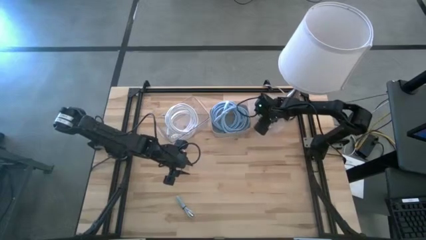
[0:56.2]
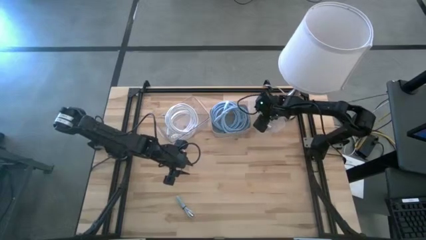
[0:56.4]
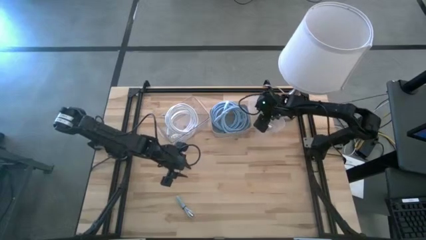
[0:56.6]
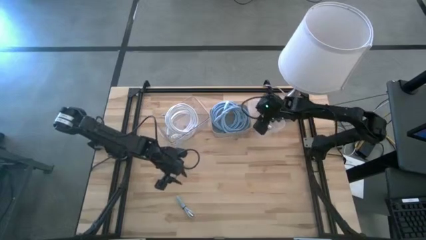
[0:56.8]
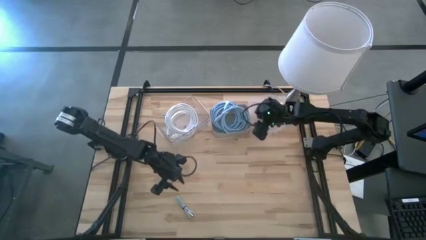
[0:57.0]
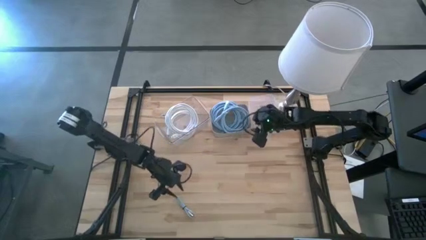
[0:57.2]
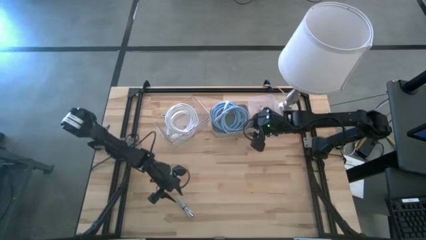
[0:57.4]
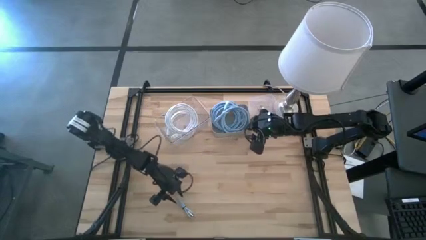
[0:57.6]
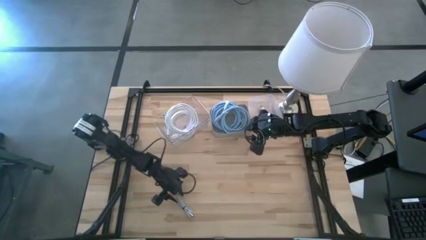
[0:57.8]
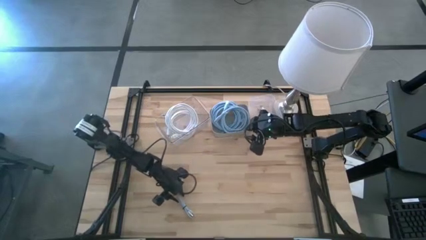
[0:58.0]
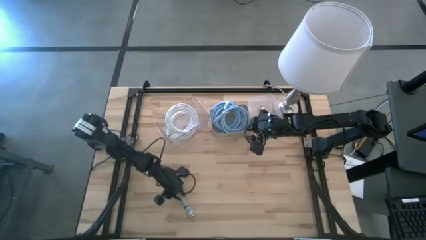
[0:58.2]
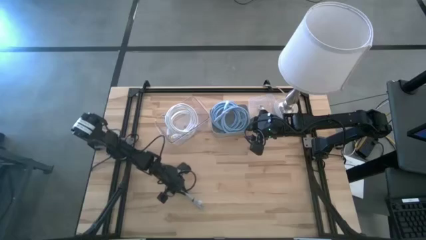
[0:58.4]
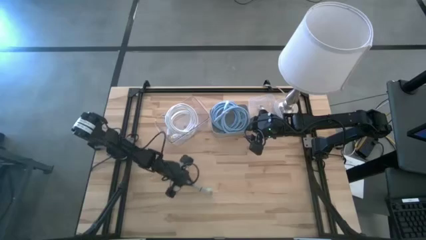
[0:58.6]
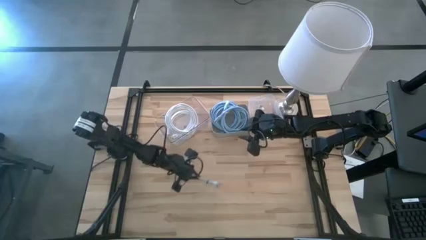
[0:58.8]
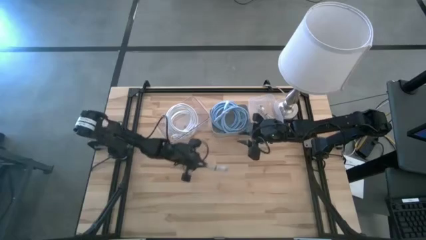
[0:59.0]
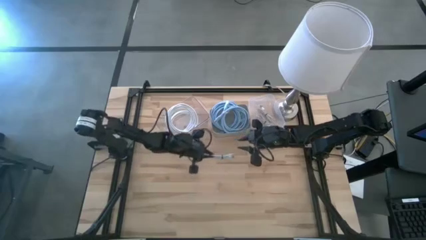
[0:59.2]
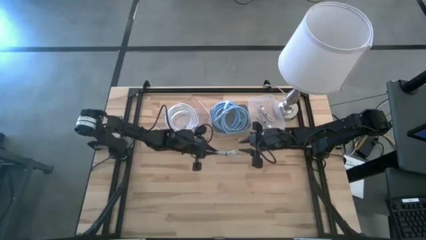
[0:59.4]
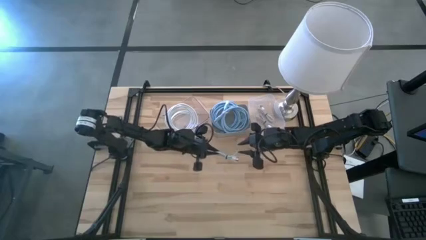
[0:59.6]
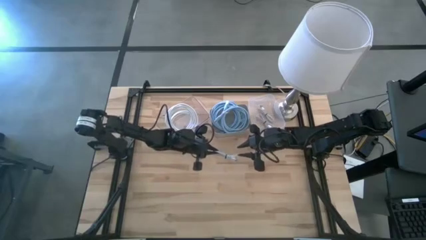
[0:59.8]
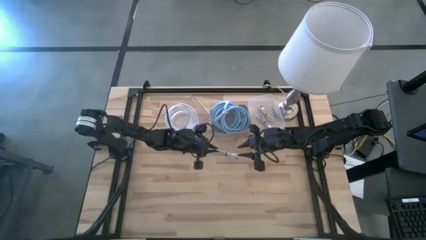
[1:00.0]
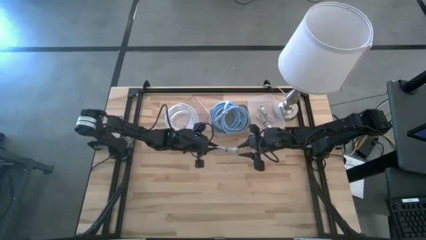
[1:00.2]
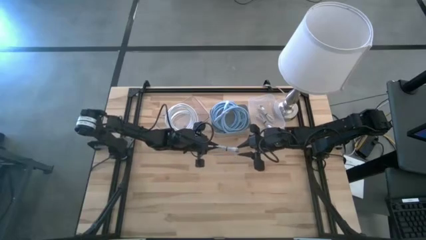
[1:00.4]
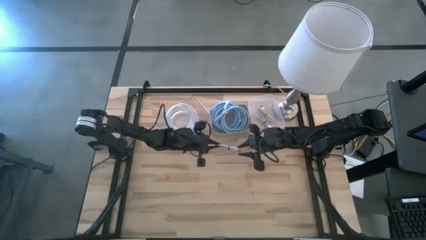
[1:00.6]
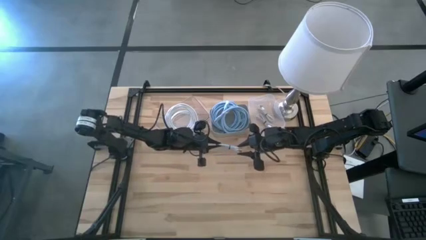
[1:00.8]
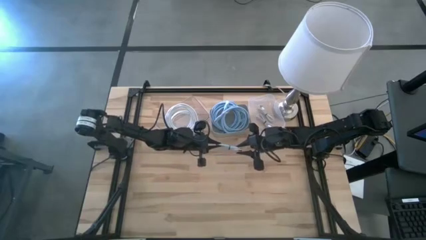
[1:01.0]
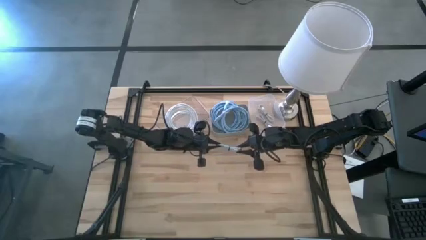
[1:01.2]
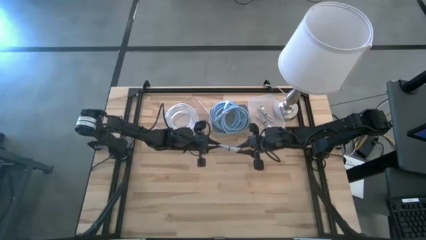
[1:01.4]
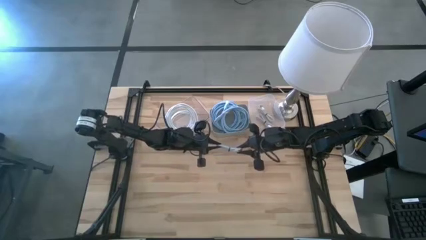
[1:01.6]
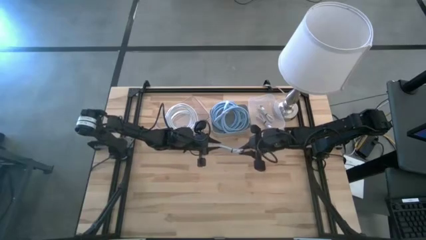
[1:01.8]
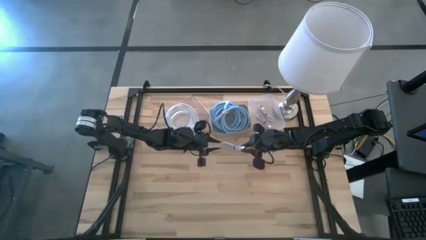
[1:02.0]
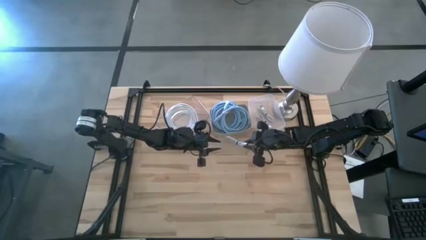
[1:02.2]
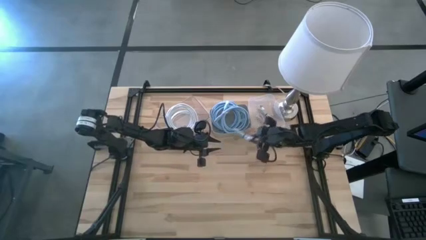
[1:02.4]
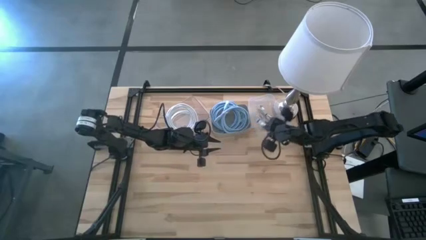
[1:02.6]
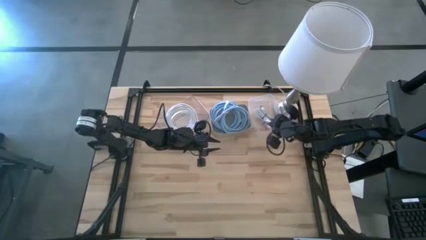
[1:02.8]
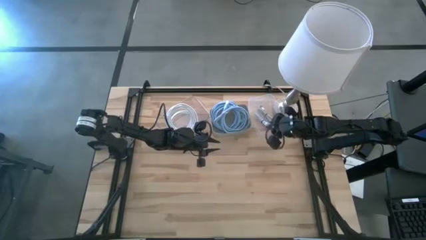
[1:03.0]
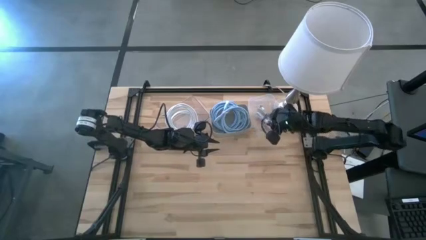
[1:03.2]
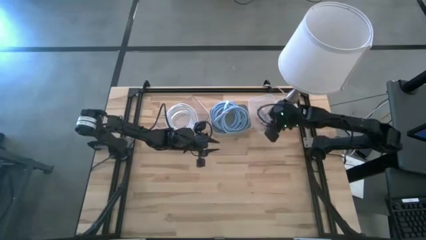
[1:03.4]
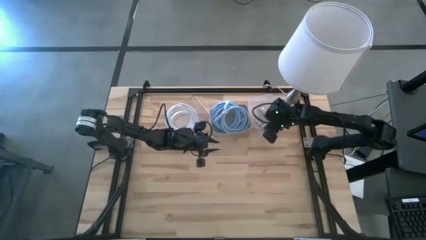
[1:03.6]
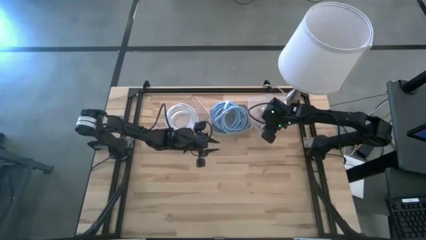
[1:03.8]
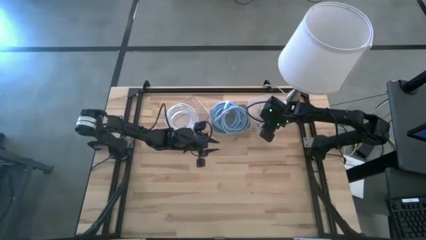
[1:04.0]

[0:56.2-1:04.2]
Task: Pick & Place USB Port
Put the light blue charger cable into the right transparent bin

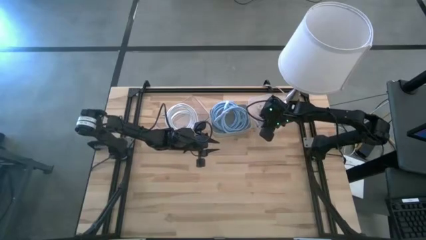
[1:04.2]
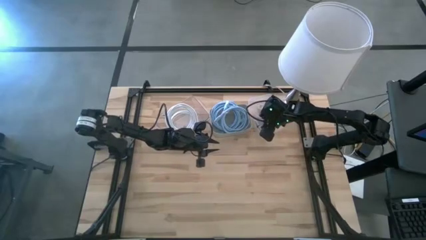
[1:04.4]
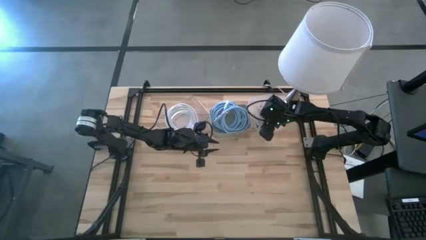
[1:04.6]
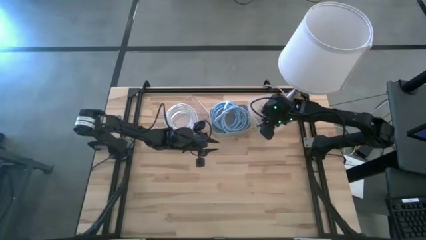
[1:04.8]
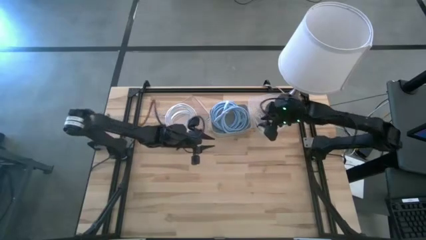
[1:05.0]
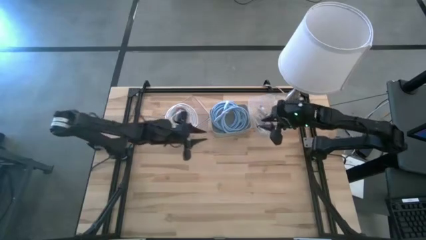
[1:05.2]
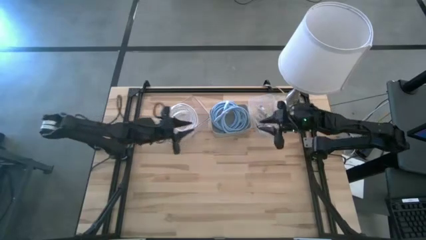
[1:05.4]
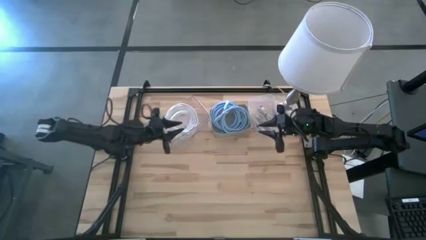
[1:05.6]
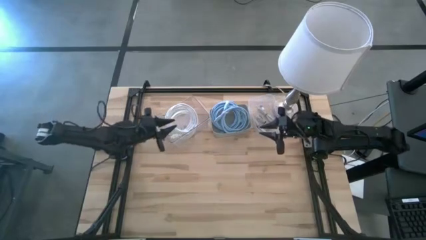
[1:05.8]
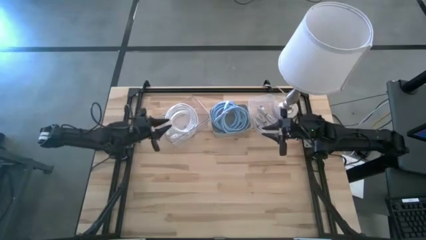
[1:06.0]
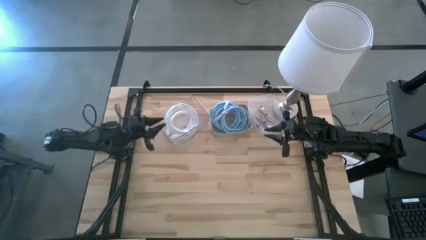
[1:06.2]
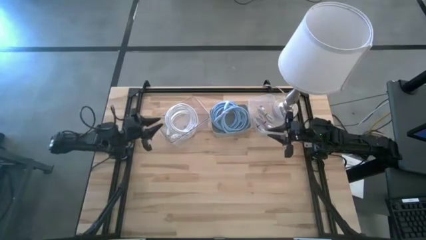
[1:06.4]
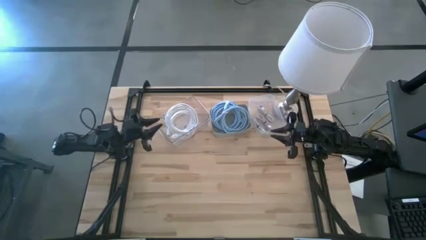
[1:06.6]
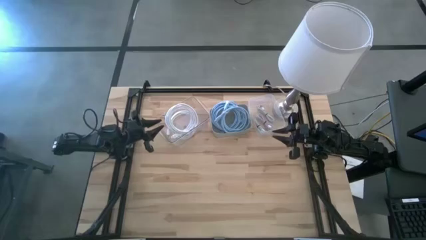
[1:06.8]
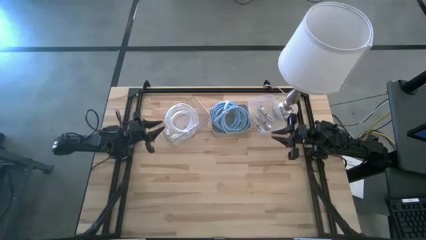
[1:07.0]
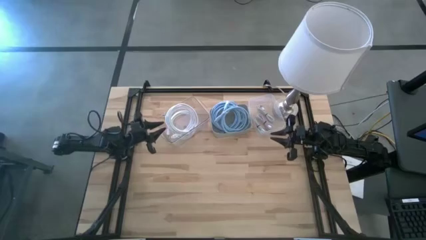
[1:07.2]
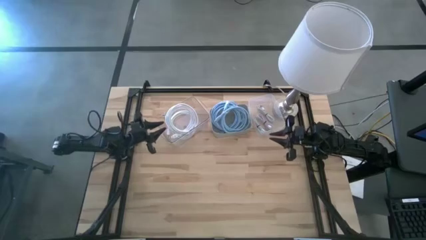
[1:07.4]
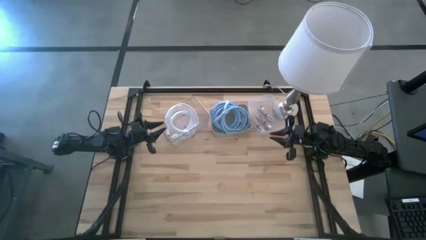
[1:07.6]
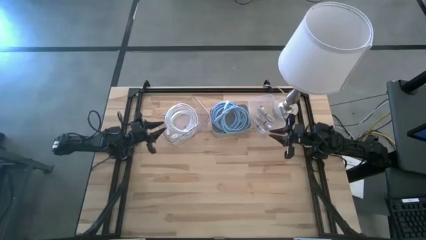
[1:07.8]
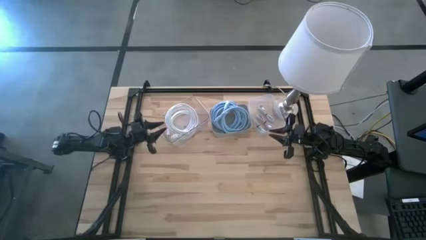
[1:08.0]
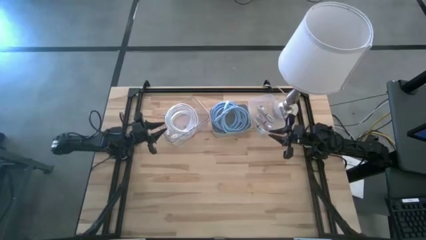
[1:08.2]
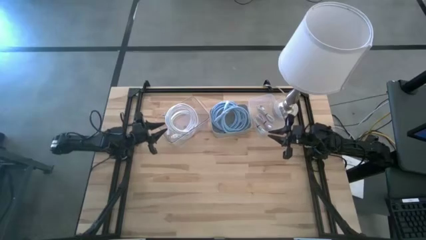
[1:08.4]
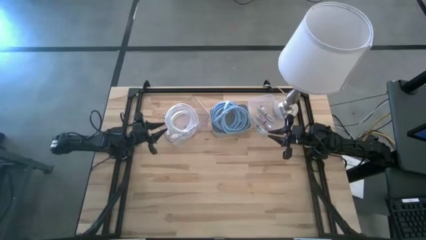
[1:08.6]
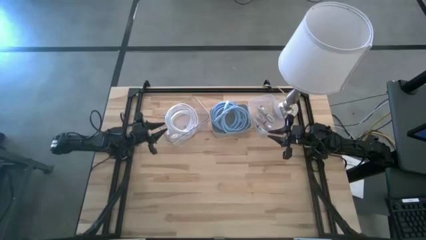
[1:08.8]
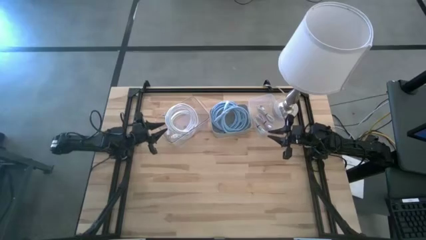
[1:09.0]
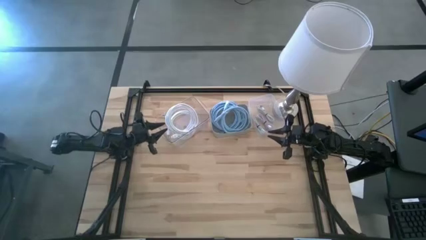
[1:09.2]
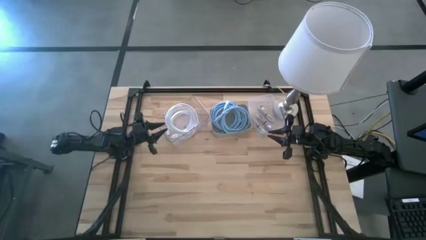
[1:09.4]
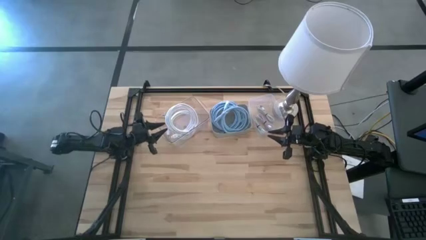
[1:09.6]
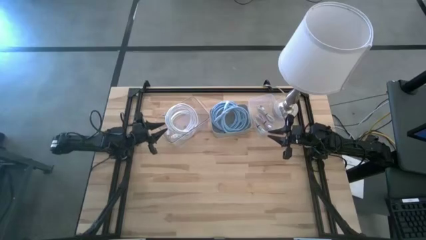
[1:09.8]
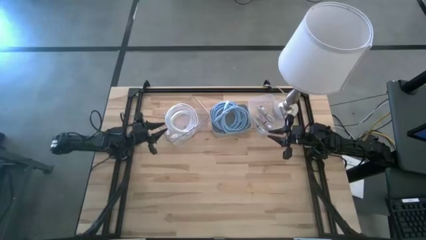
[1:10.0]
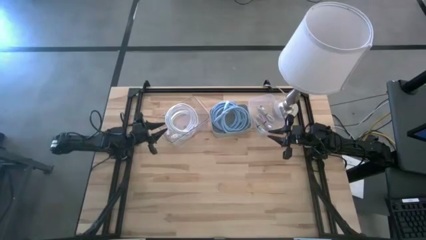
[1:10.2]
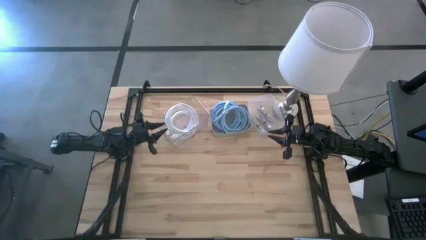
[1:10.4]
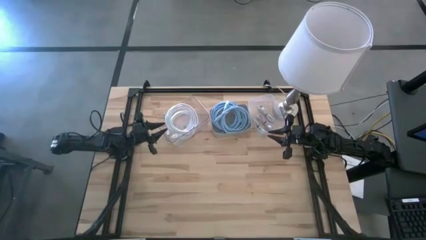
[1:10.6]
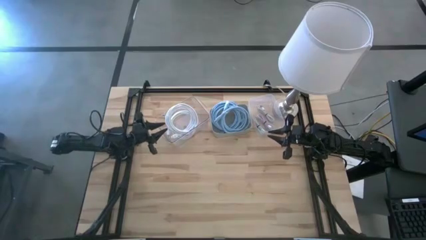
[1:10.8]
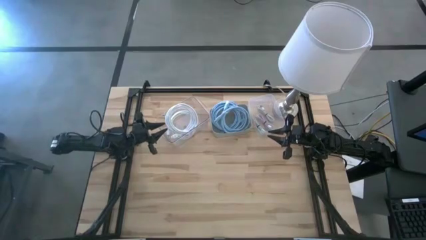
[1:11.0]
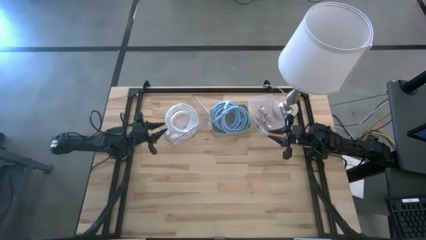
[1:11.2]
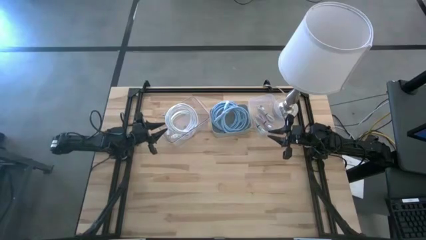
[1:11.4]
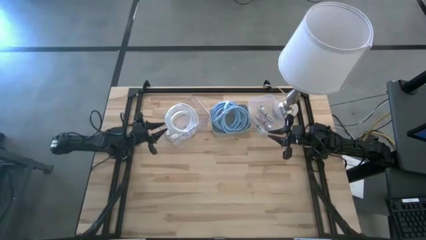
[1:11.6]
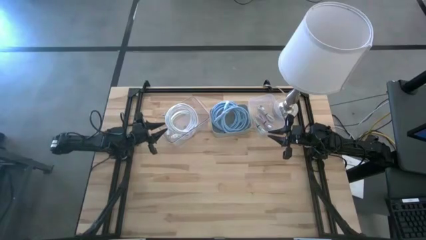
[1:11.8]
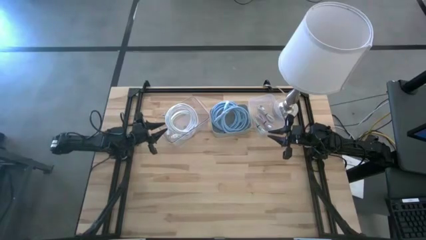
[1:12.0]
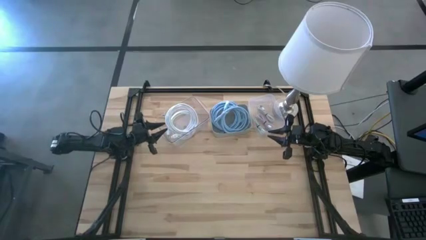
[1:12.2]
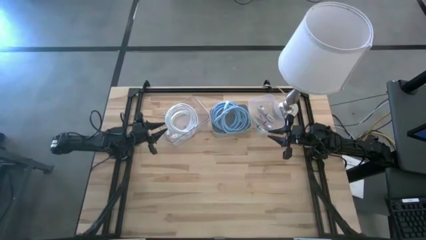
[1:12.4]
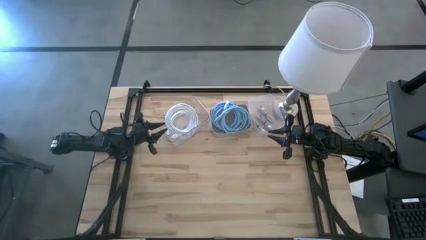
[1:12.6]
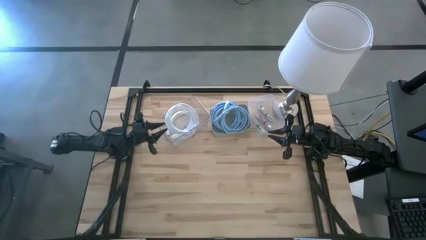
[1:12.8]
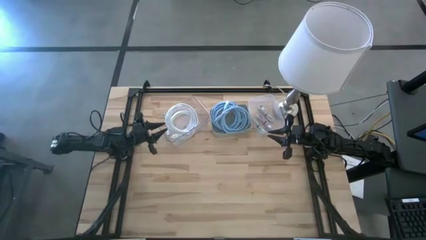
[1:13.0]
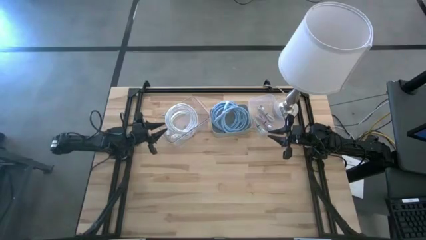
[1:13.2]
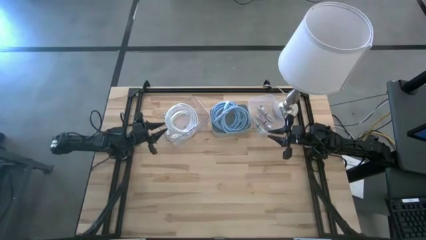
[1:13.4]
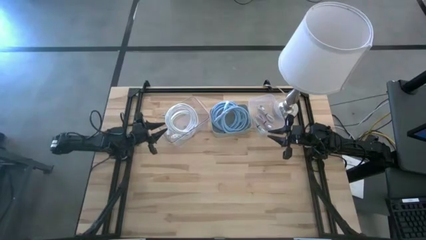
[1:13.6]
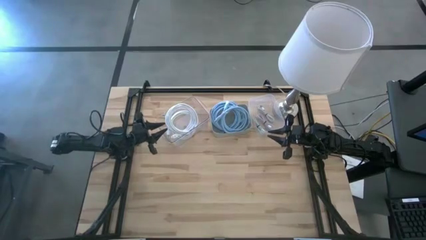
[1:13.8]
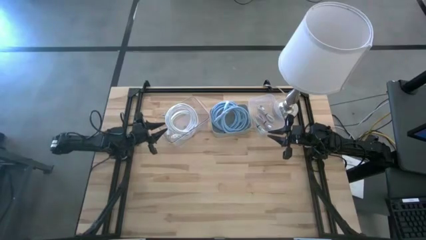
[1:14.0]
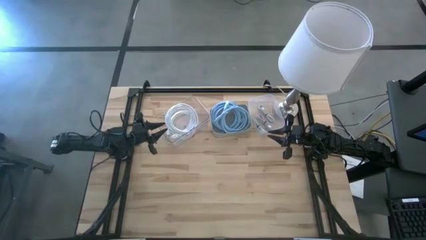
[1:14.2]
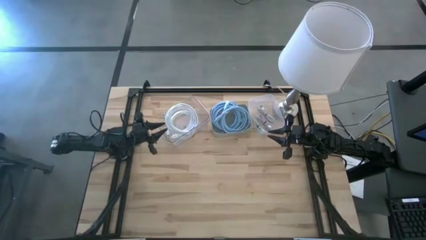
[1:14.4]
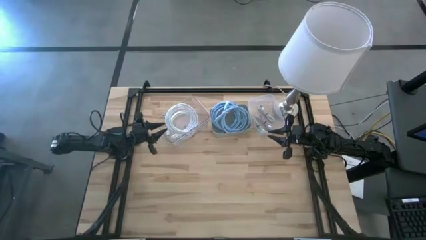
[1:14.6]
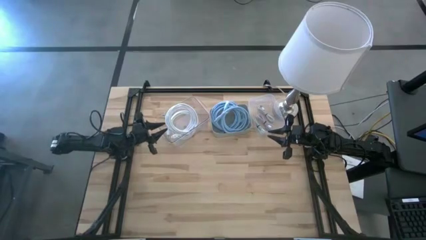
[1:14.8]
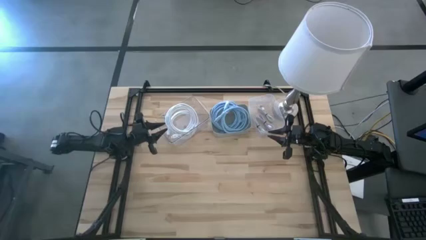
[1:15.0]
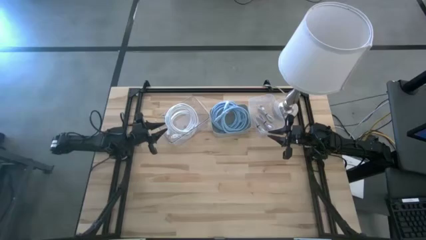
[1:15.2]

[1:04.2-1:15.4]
Return to Home Position
